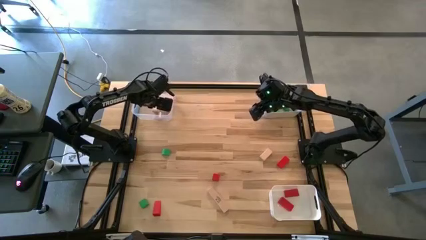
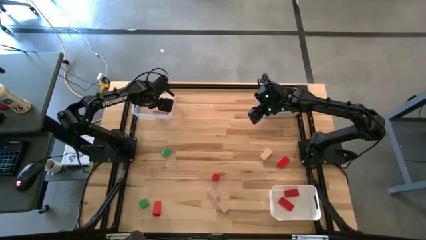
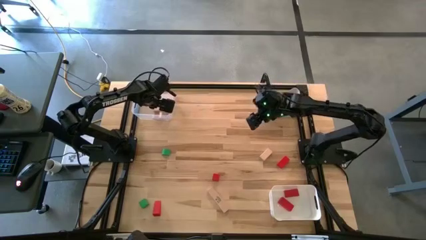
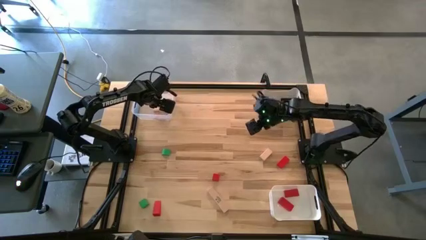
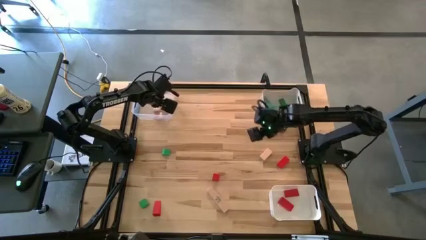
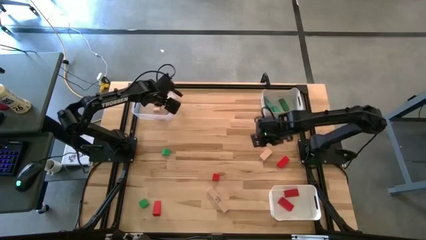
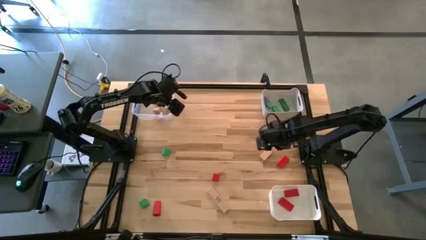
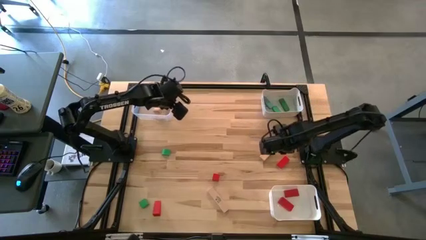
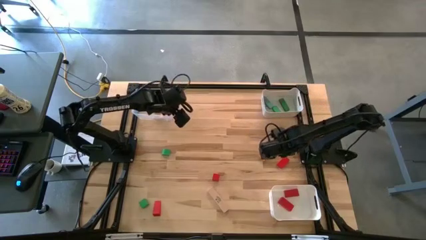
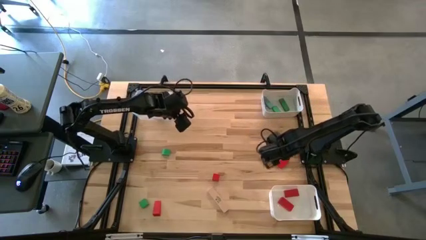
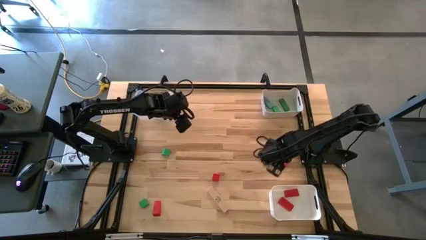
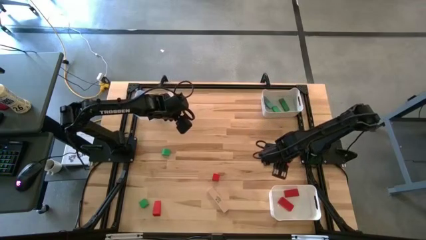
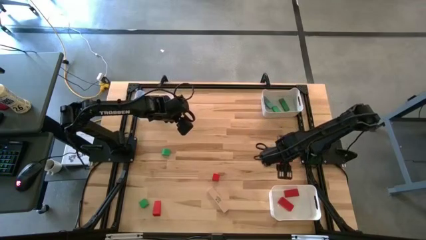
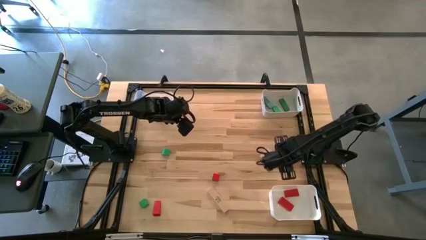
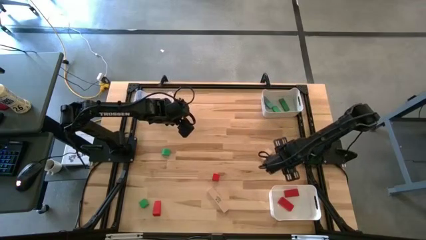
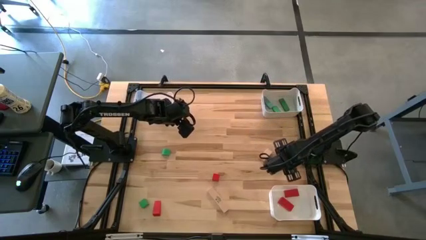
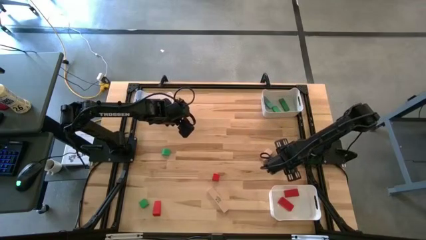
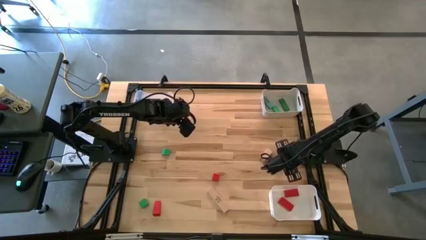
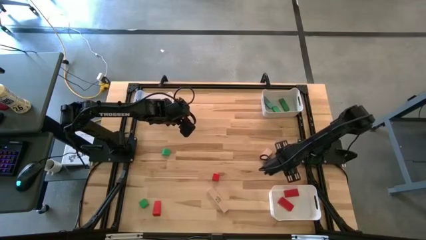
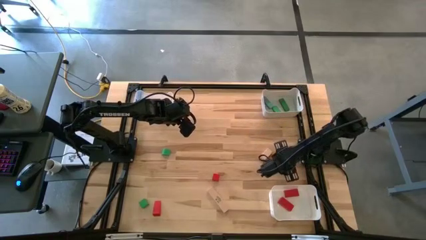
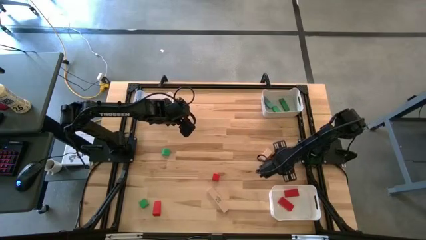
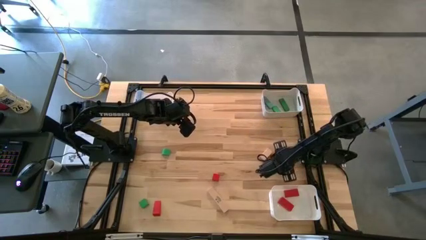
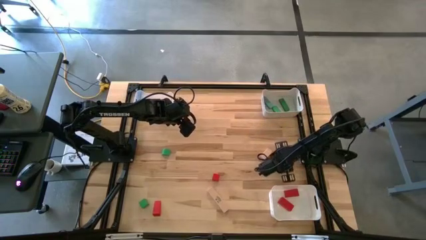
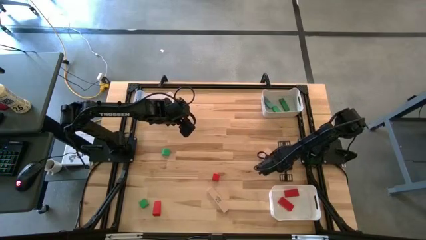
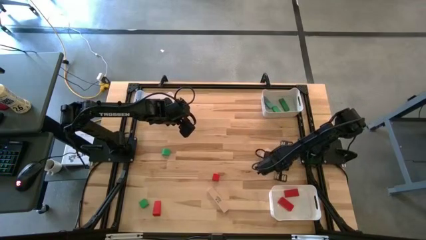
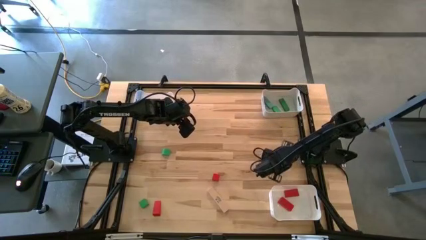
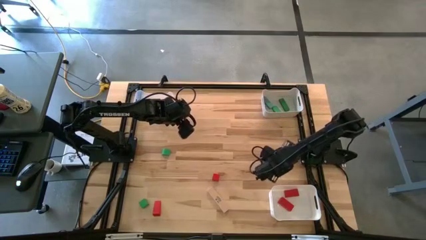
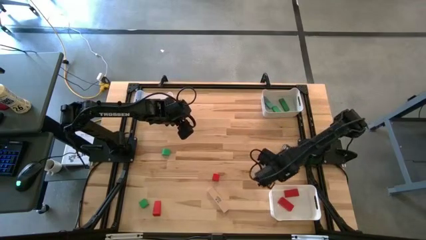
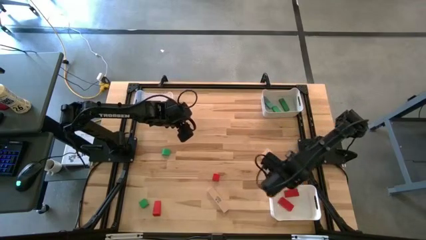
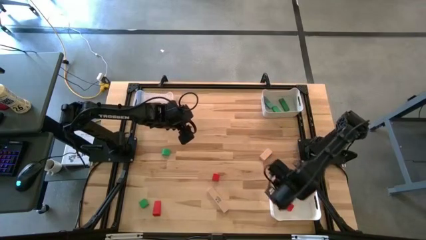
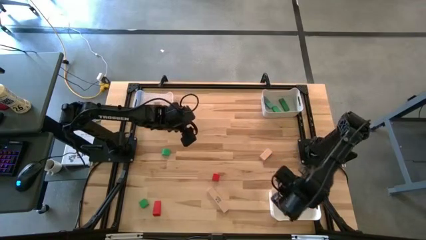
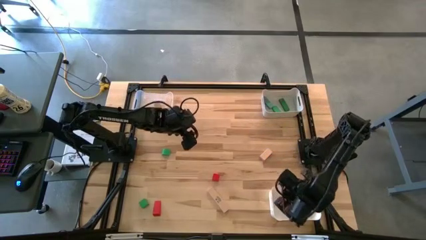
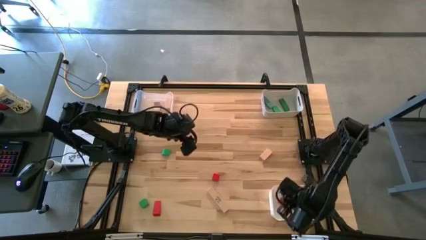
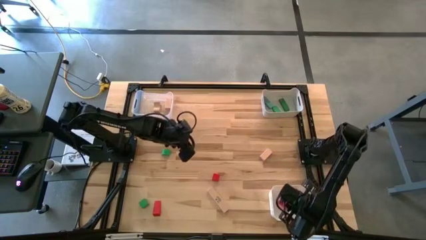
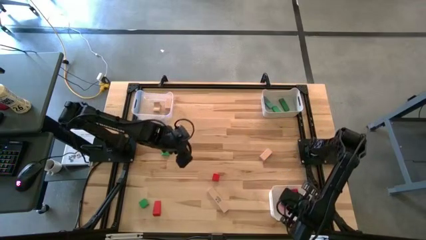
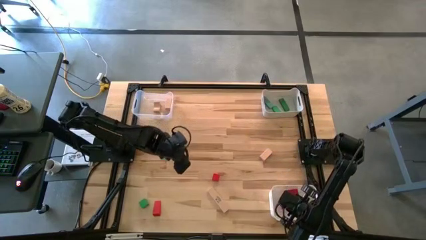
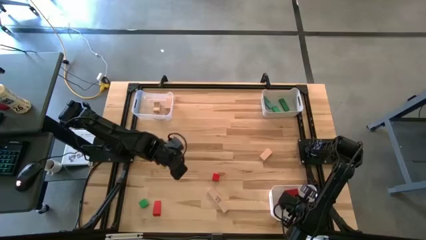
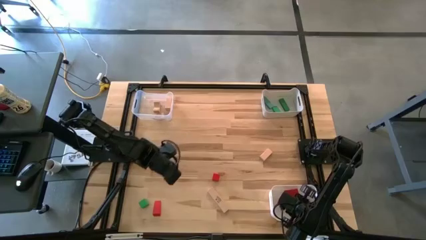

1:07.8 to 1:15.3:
Task: Sort & place blocks by color
Put the red block into the white bin

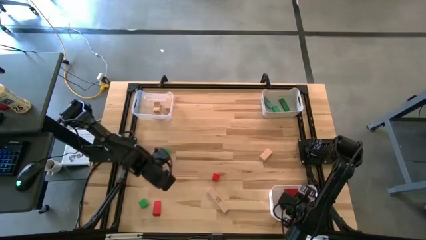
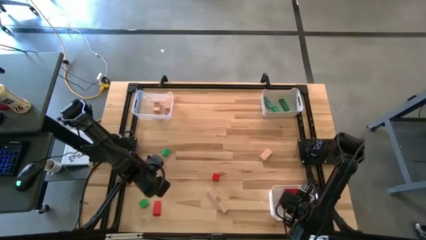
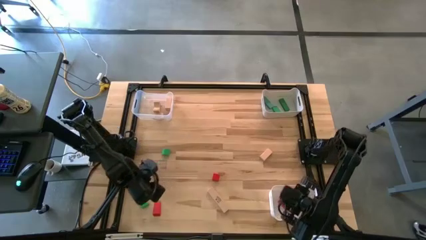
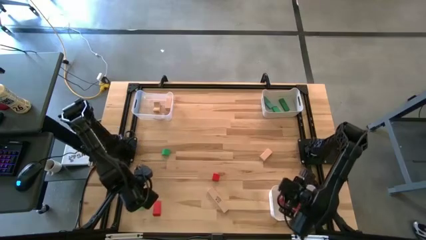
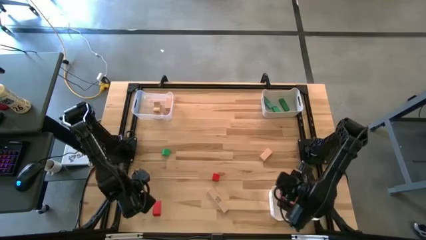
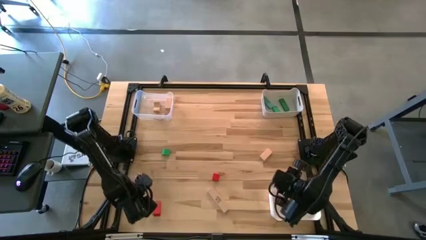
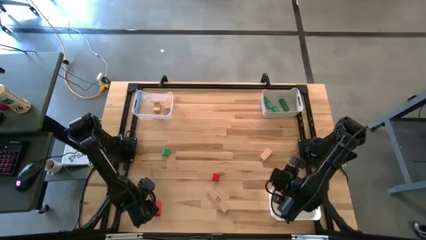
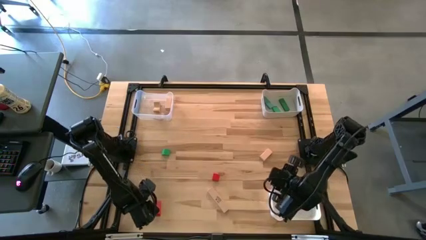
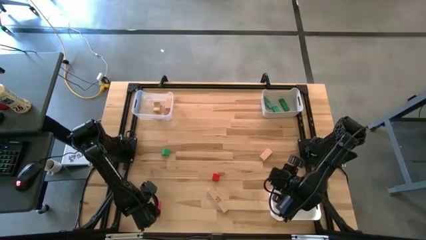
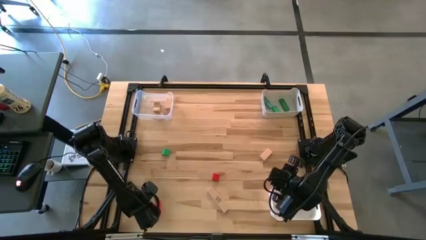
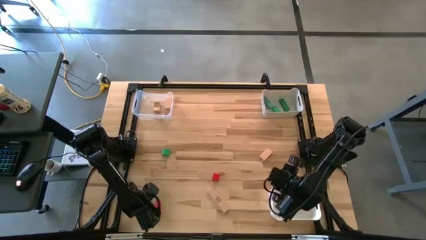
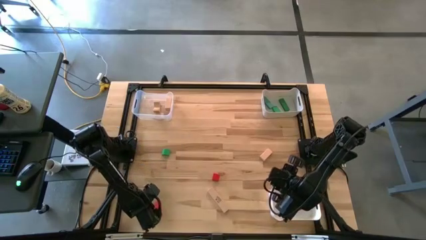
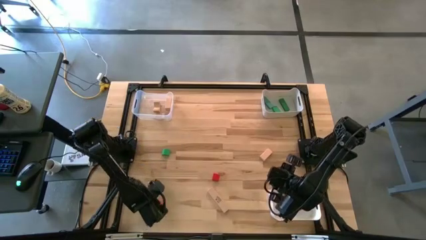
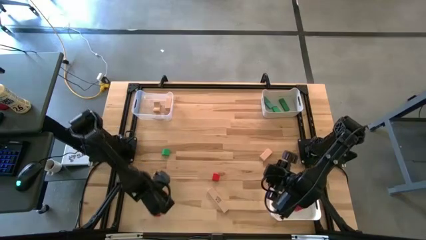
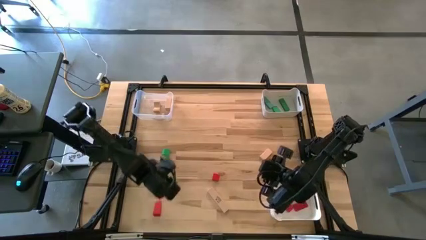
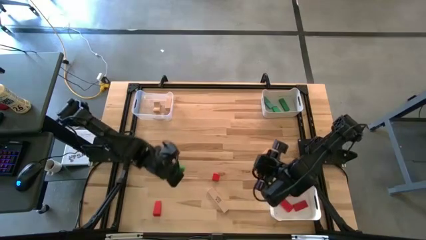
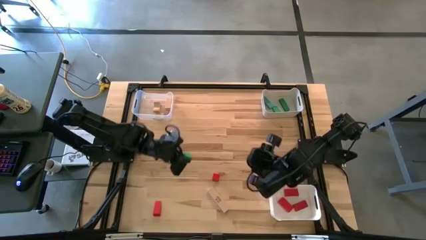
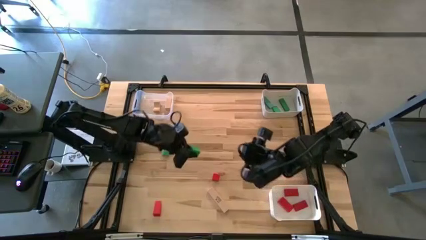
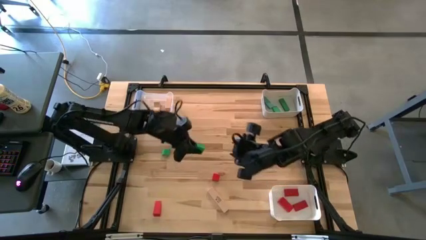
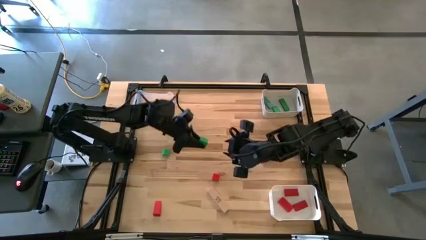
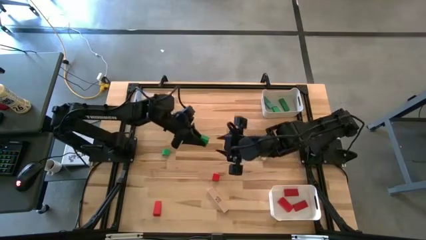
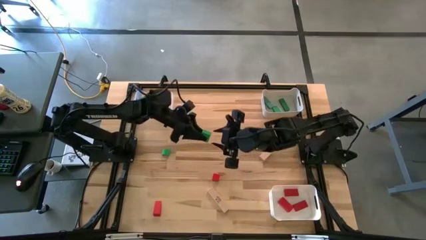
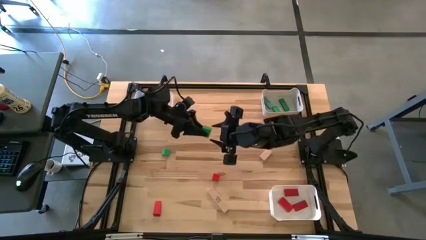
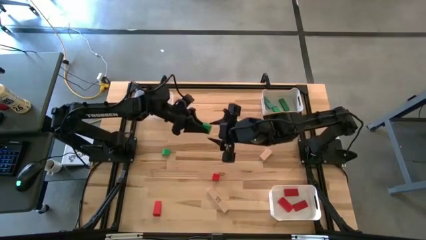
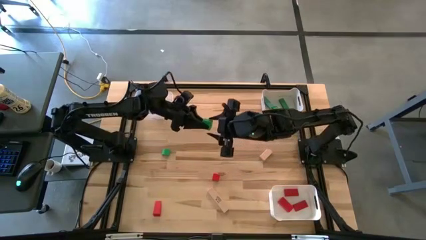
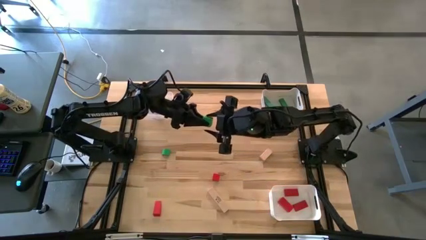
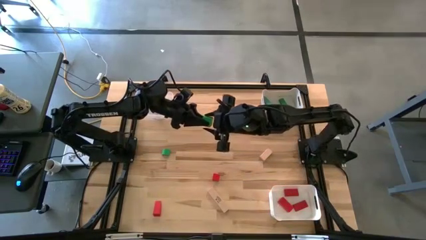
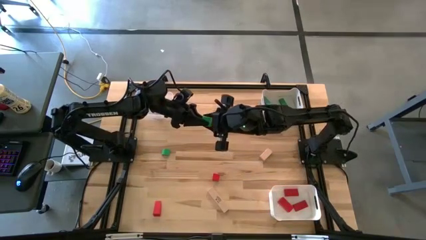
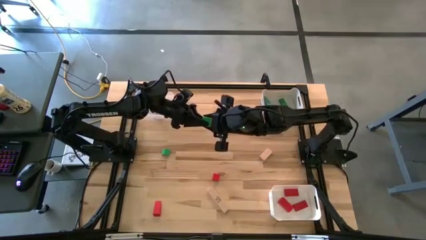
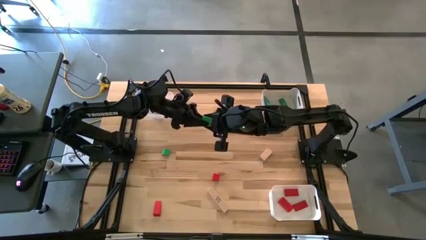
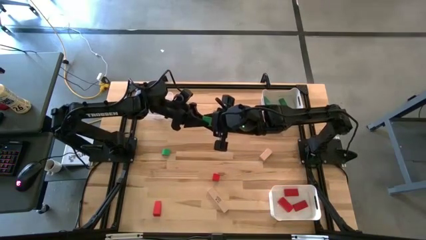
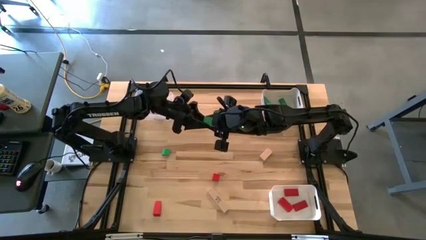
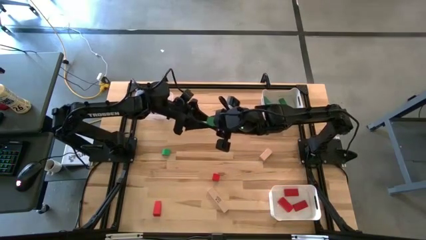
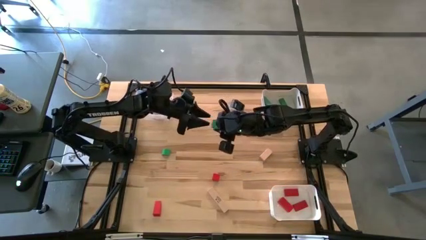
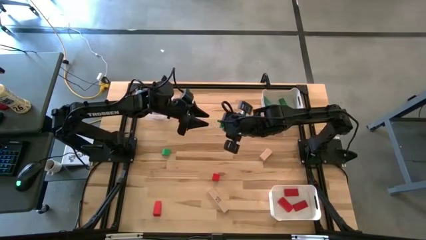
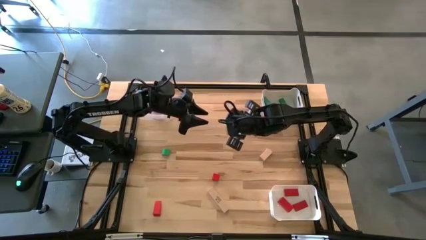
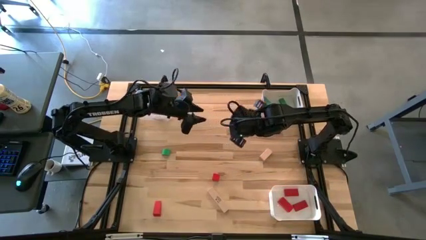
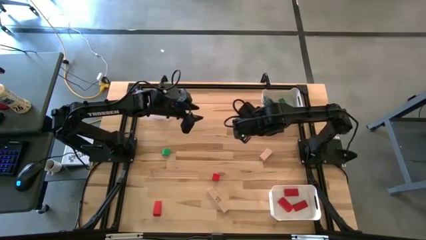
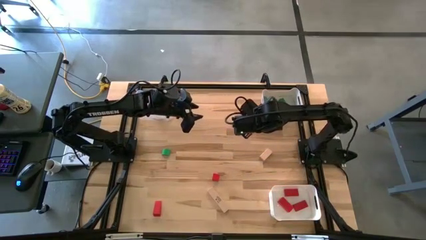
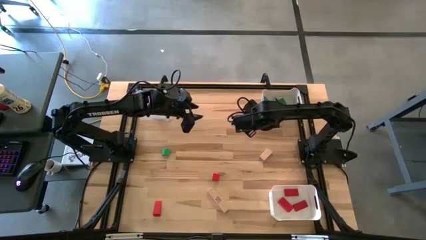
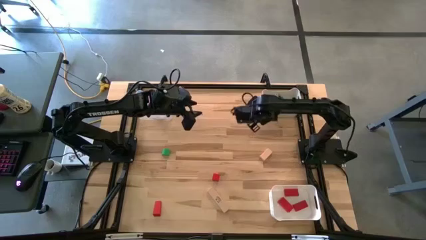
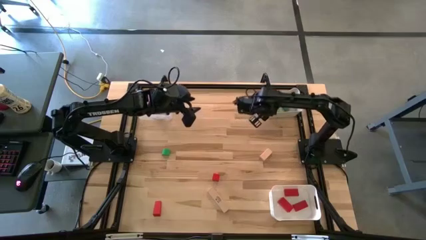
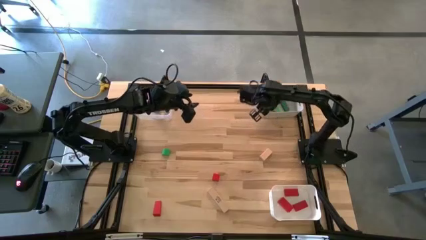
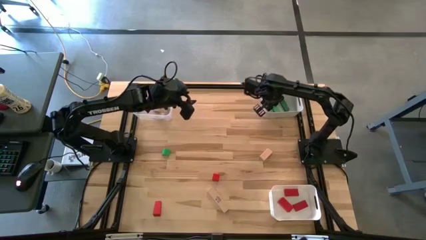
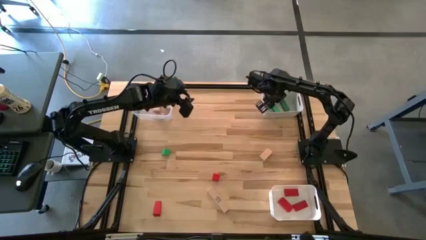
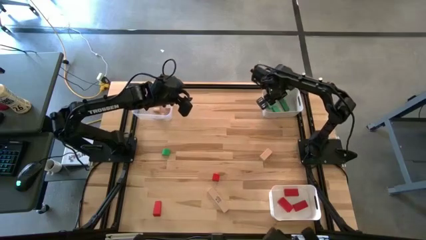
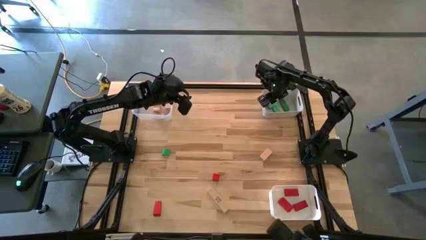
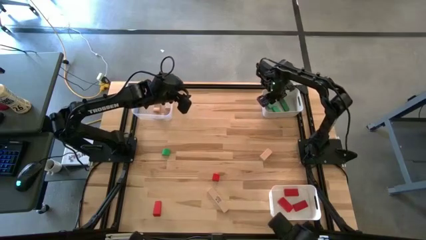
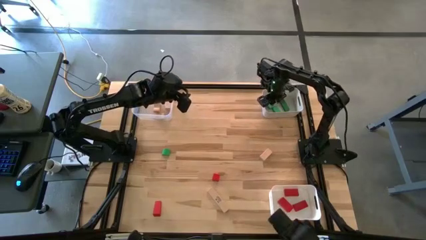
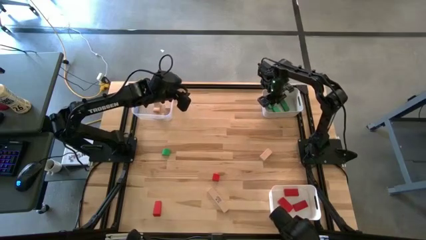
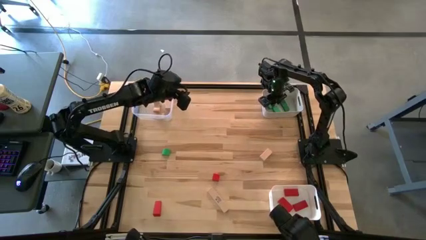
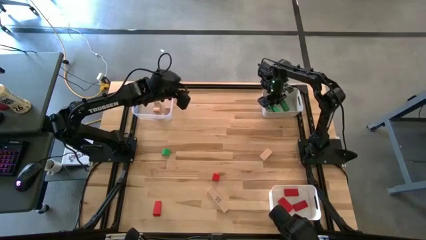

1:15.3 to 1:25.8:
Put the green block into the gray bin
